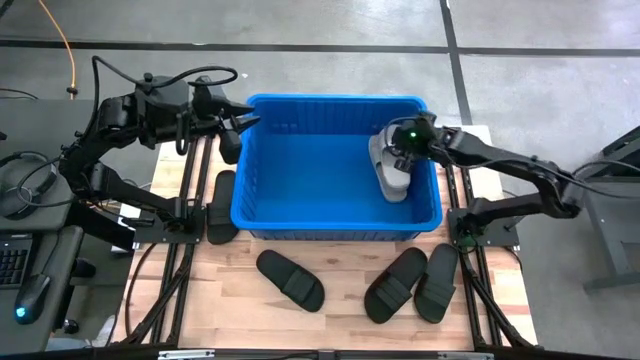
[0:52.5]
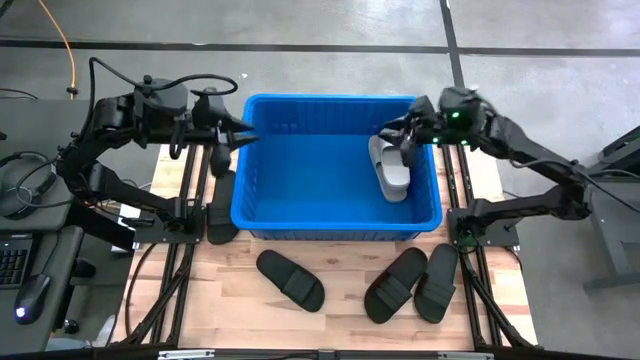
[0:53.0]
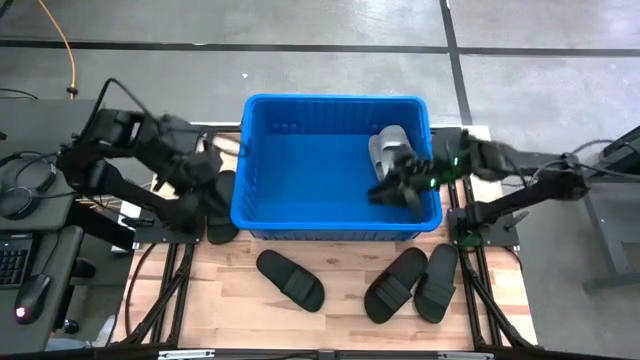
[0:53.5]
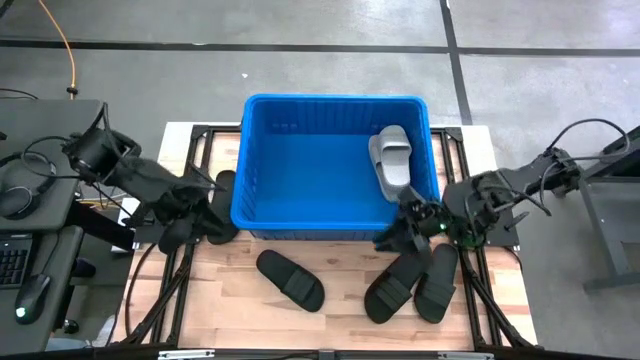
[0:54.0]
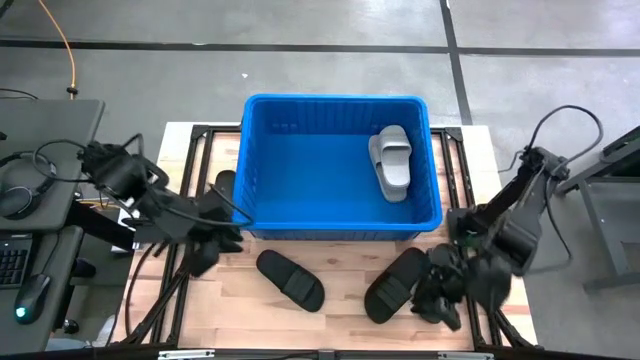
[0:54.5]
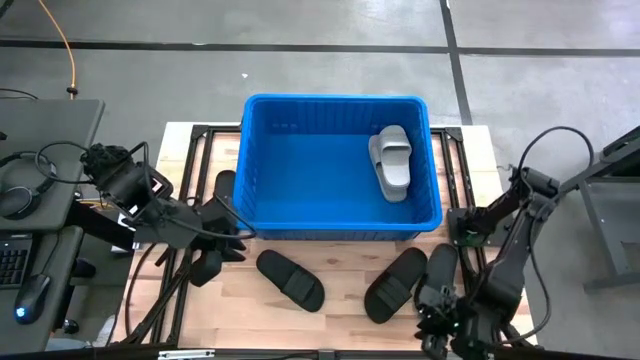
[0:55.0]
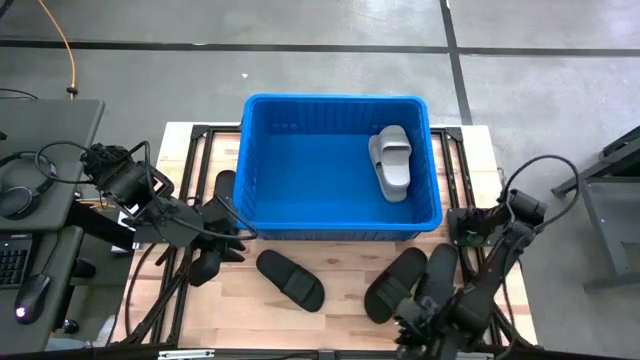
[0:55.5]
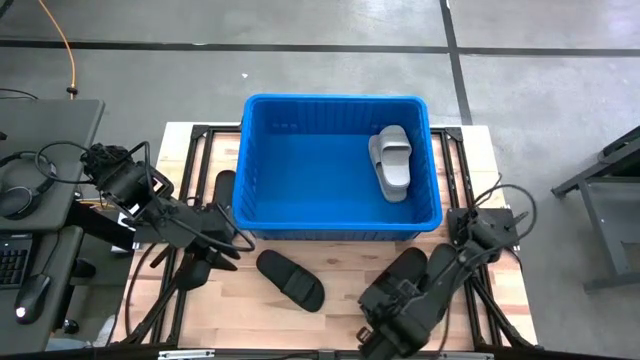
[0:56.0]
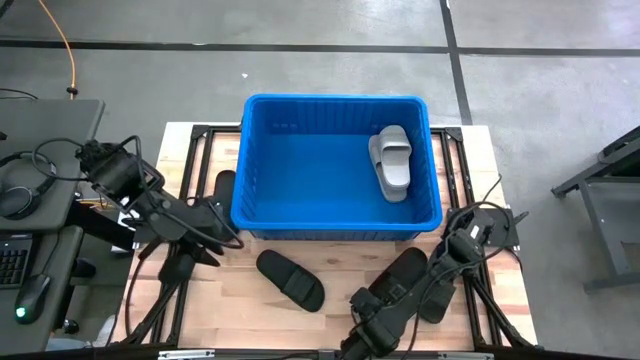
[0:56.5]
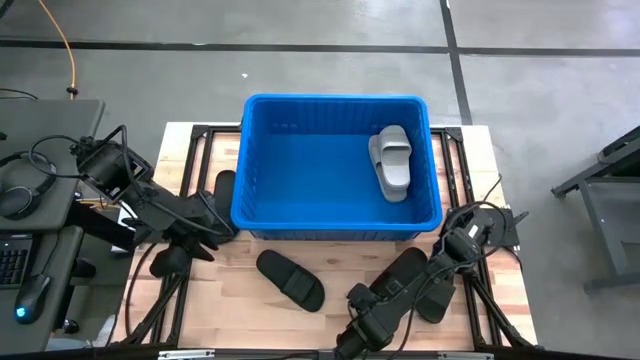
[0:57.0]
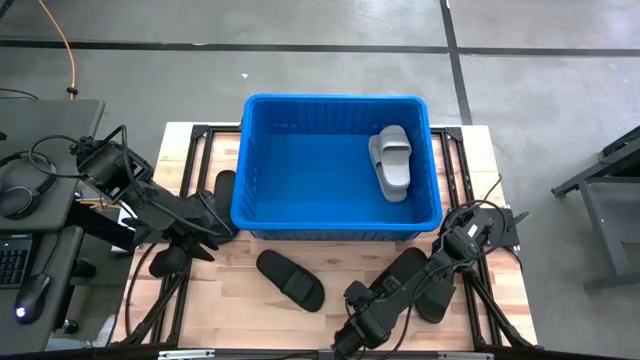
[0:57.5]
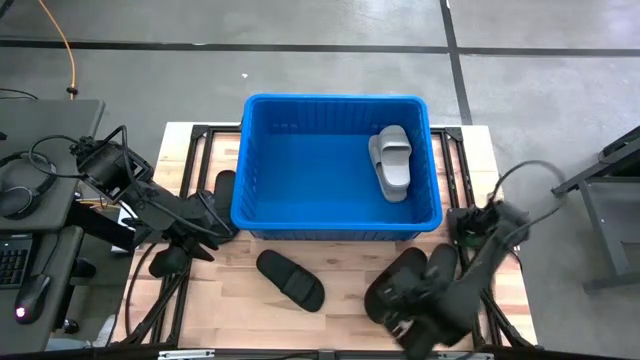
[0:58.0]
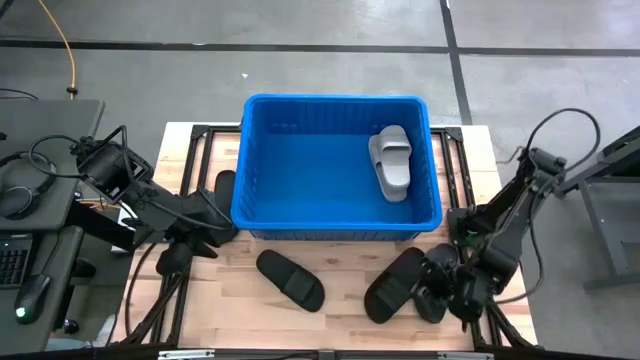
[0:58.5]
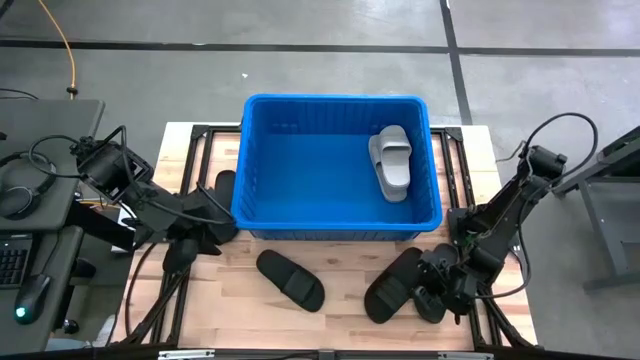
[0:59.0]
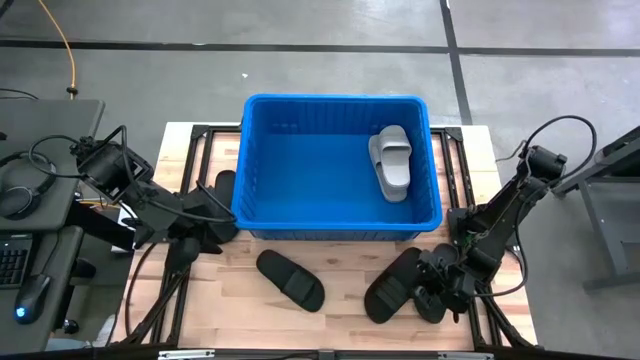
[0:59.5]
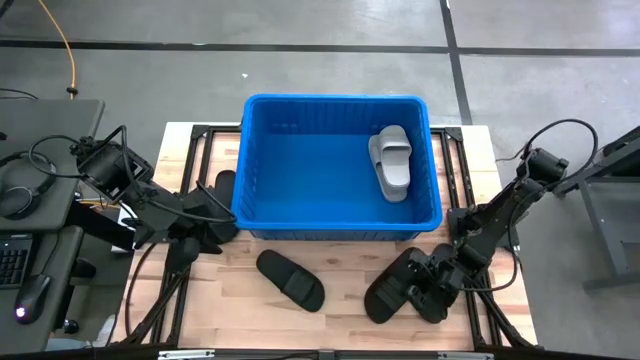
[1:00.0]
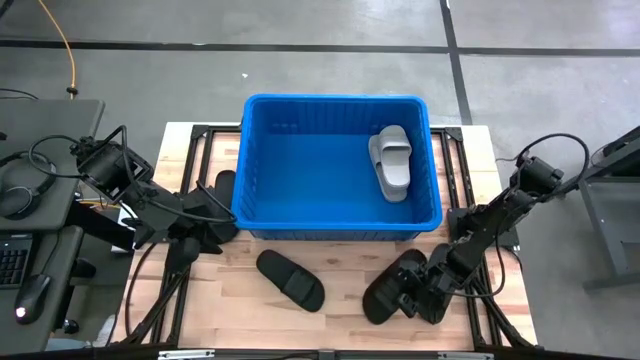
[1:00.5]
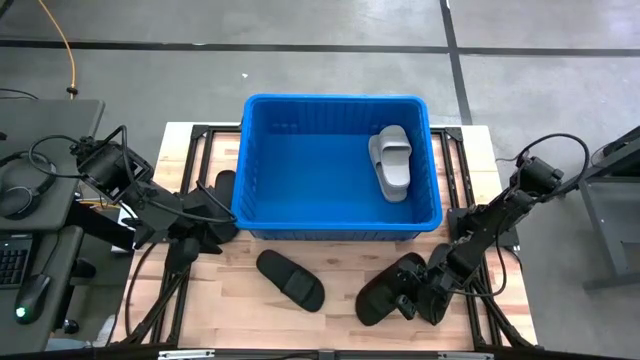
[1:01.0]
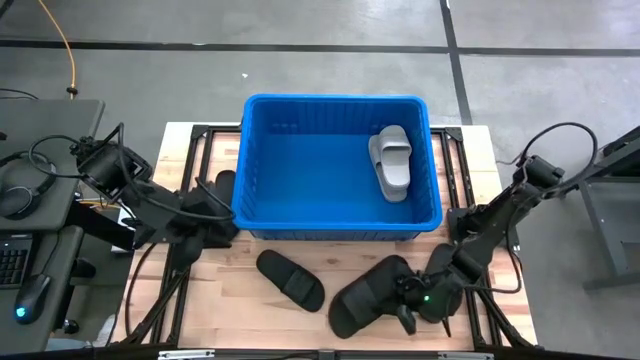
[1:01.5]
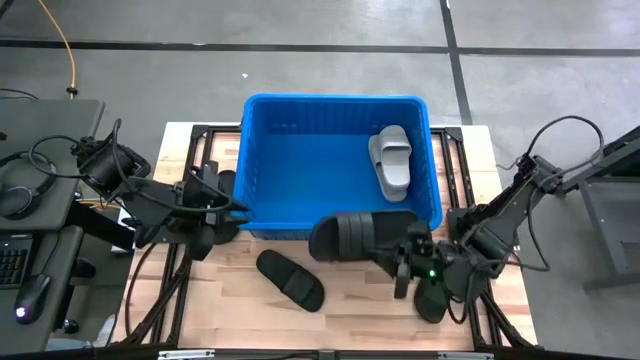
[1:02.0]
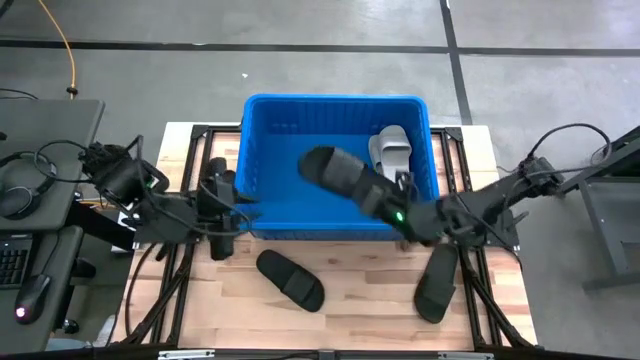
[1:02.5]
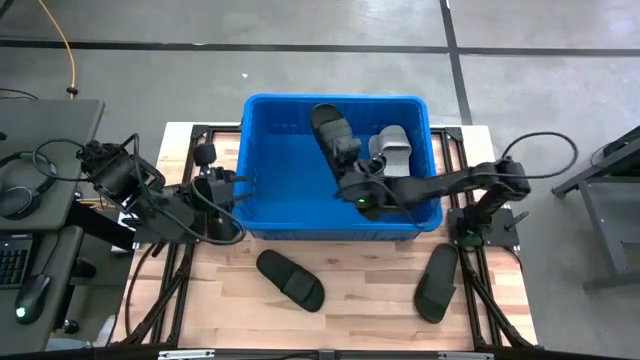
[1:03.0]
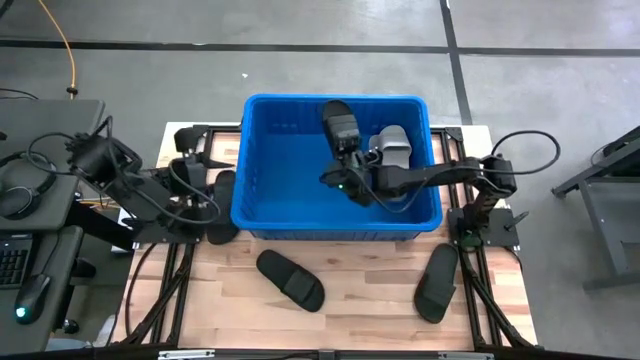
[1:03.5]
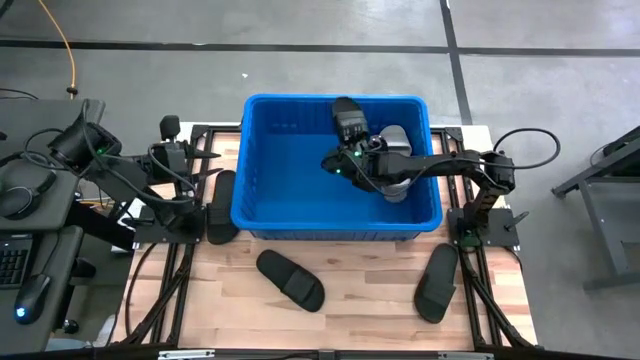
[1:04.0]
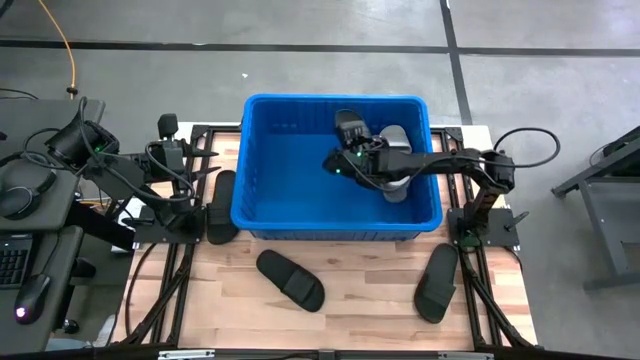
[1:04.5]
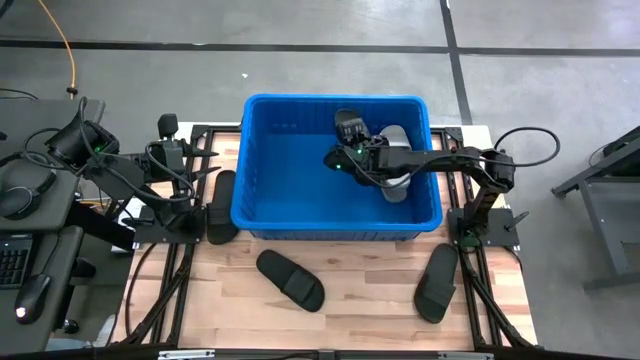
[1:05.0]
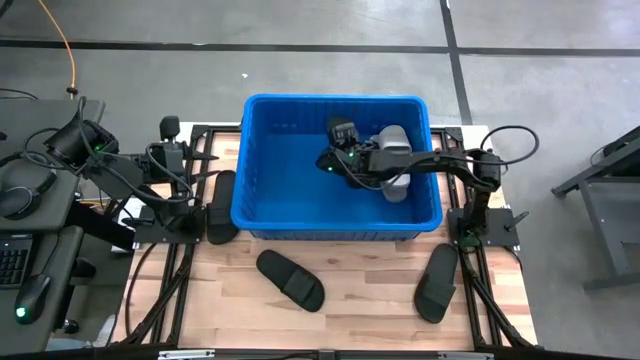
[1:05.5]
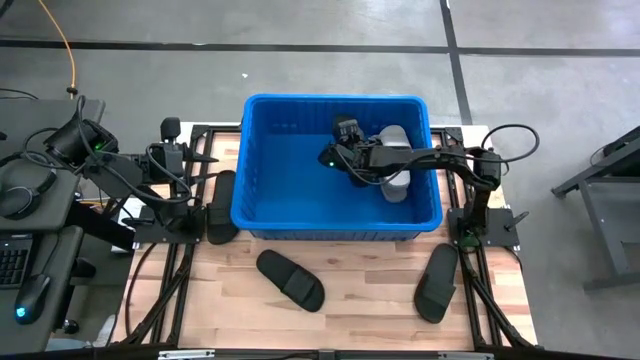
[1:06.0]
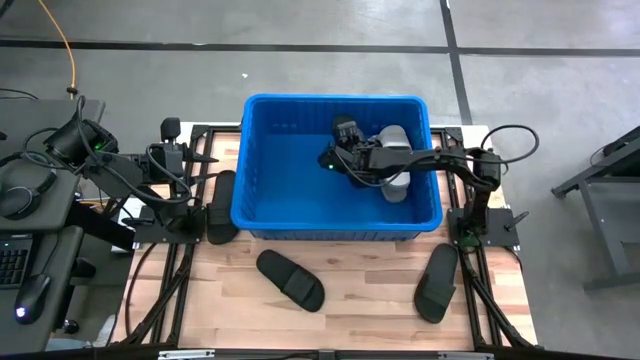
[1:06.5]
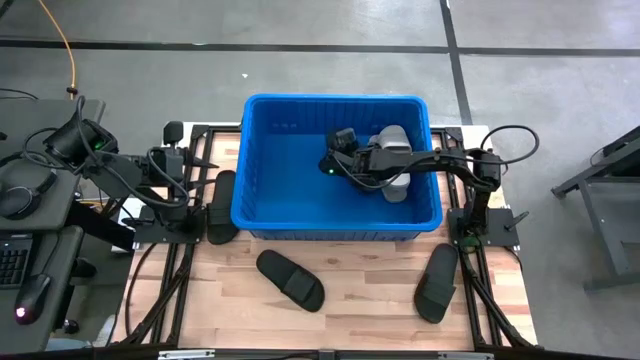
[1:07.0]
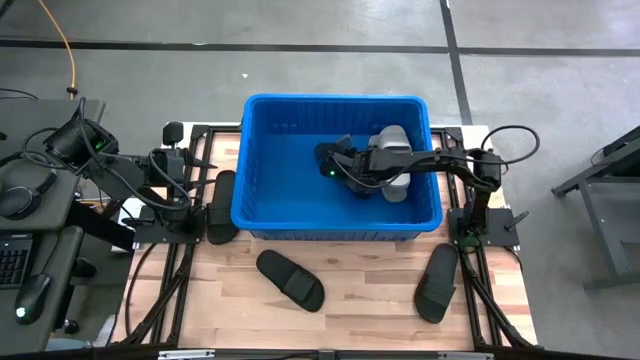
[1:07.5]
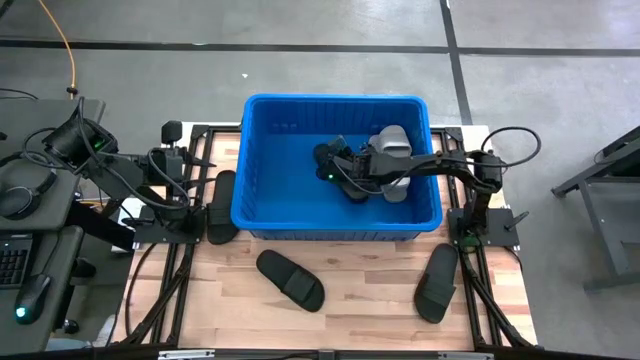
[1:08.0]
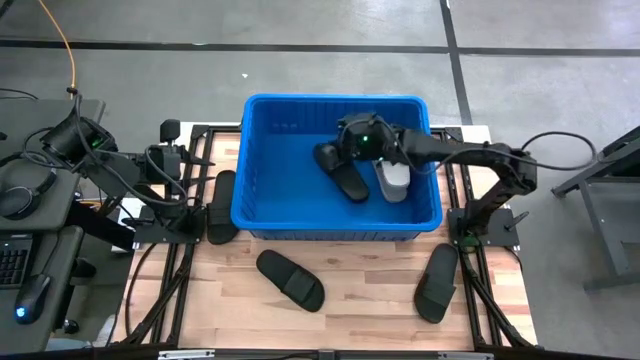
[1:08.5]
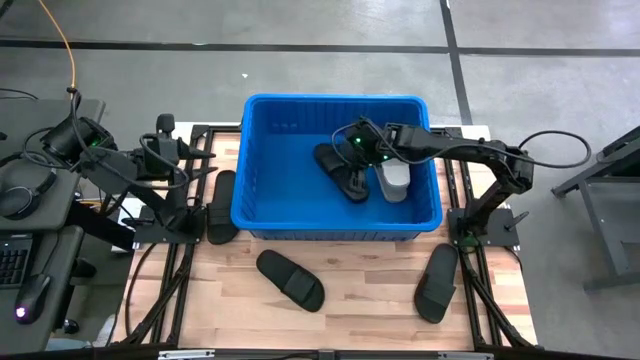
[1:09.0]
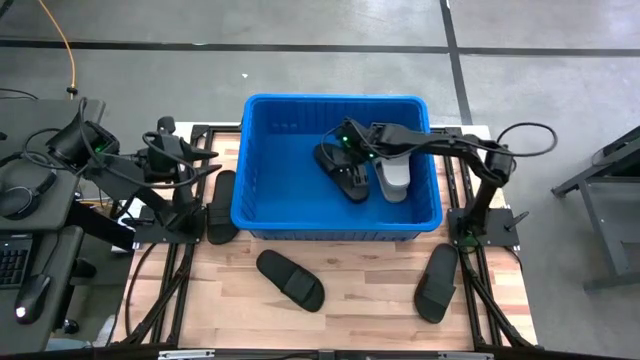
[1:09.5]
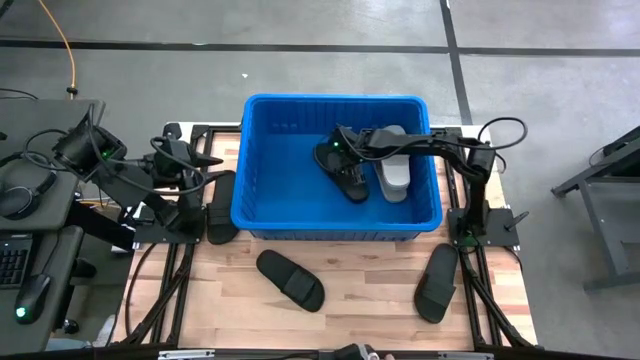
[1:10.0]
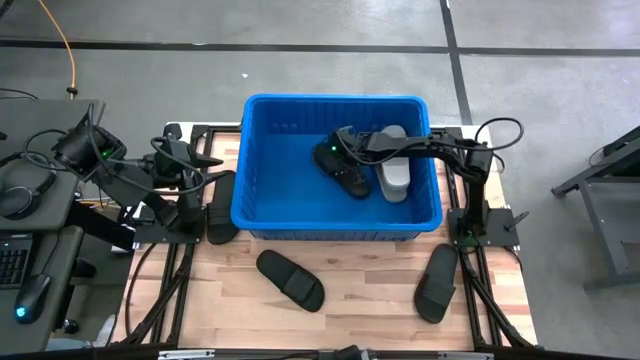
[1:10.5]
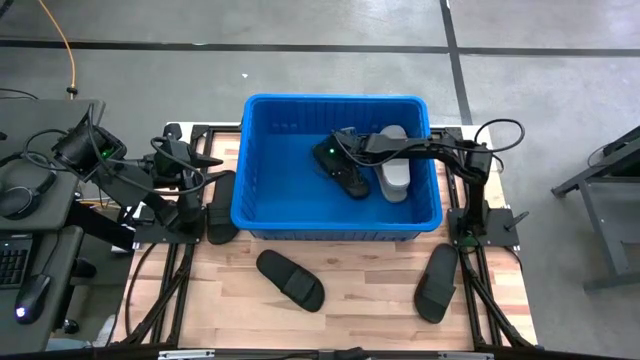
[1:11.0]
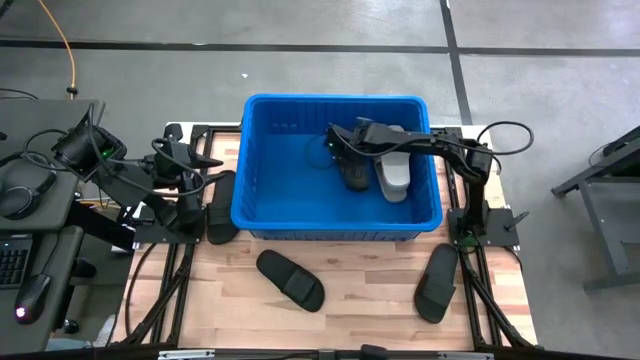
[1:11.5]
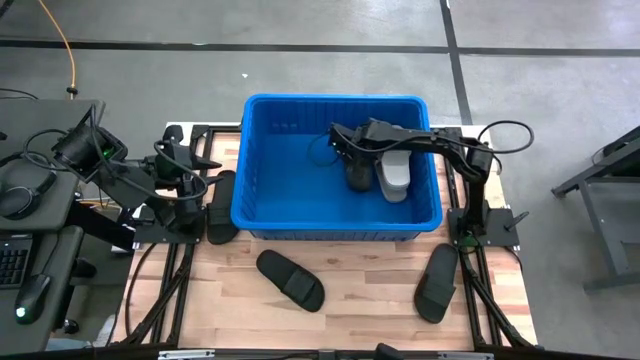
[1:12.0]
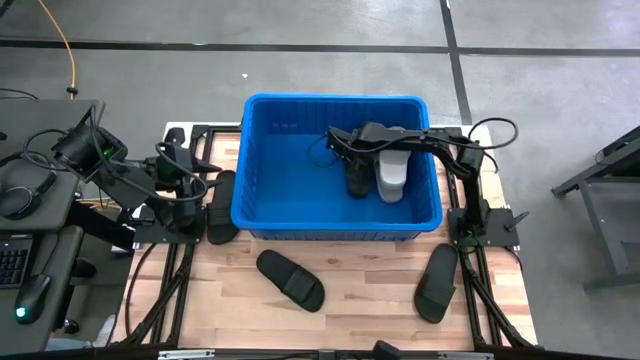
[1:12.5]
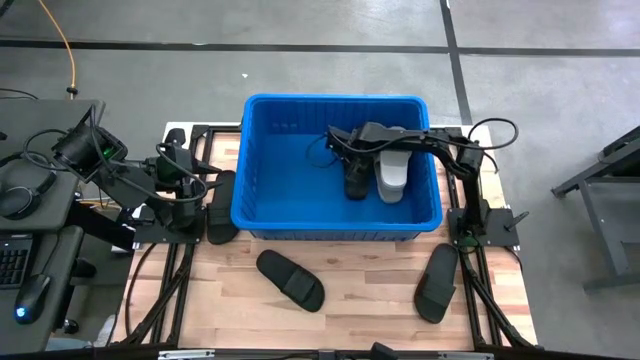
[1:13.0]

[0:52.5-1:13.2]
Task: Pick and place slides into bin
Put the middle right black slide into the blue bin
